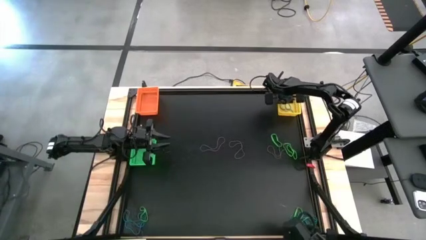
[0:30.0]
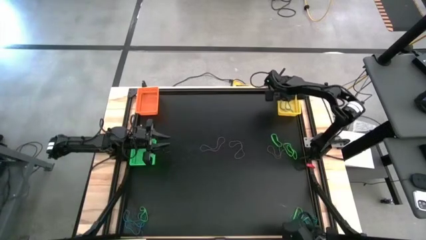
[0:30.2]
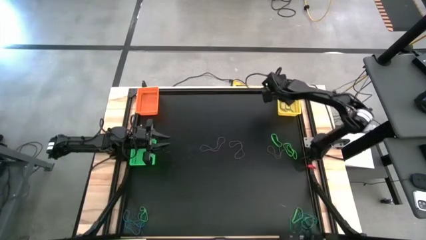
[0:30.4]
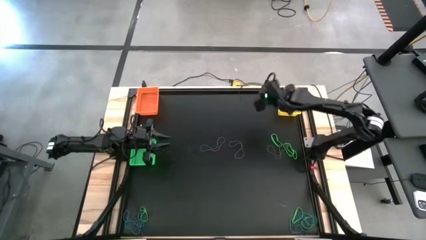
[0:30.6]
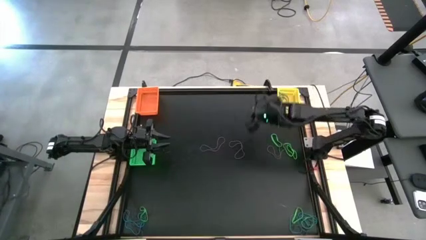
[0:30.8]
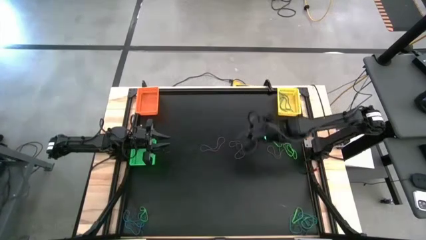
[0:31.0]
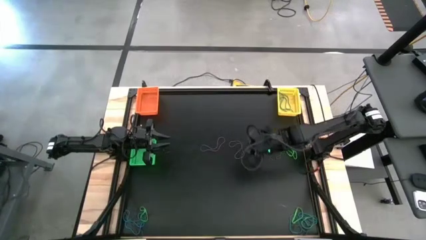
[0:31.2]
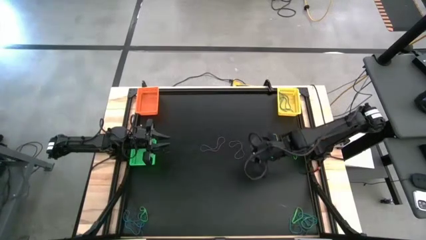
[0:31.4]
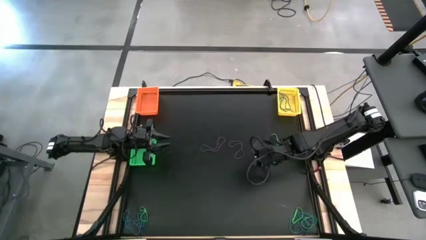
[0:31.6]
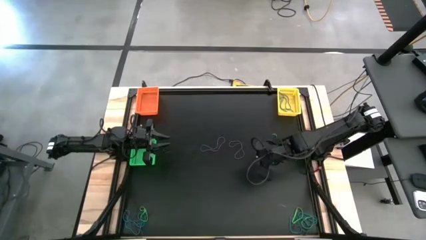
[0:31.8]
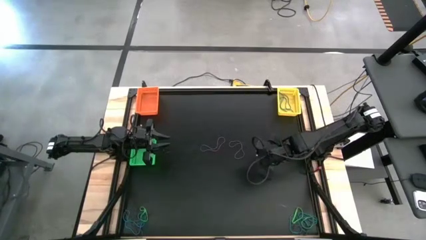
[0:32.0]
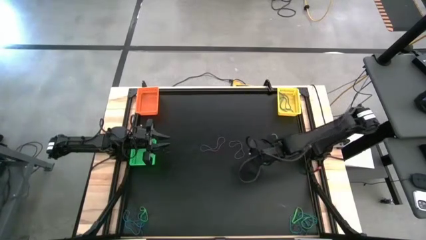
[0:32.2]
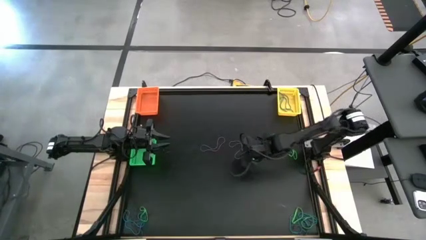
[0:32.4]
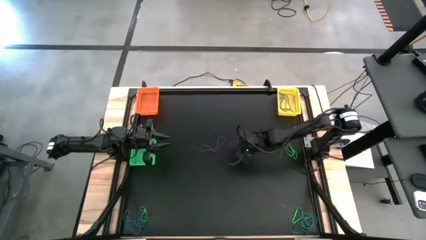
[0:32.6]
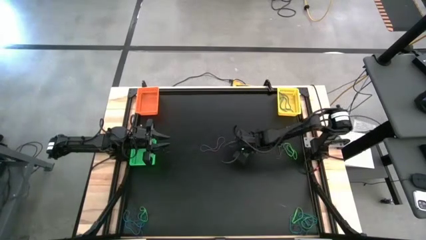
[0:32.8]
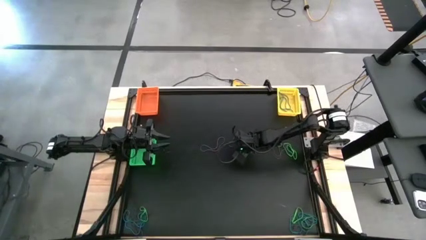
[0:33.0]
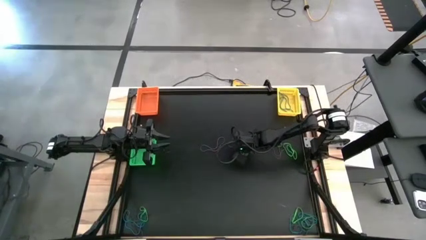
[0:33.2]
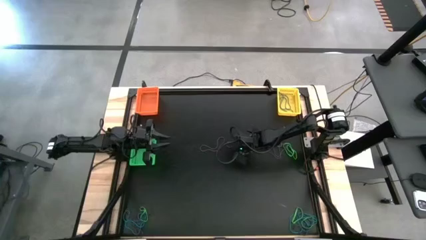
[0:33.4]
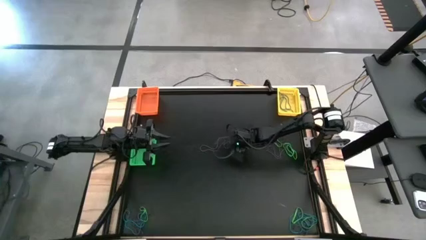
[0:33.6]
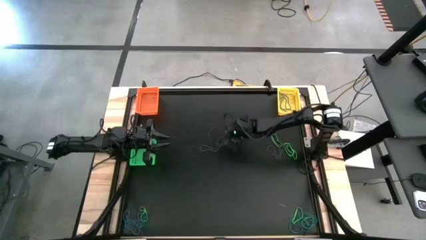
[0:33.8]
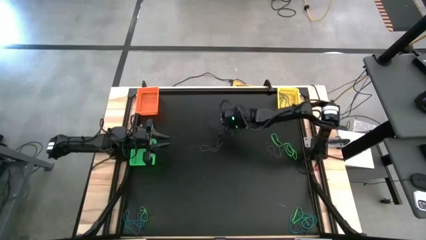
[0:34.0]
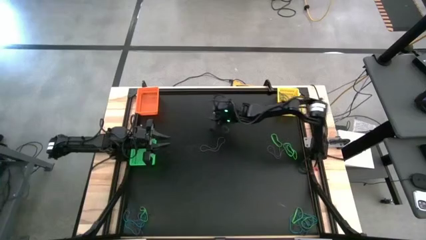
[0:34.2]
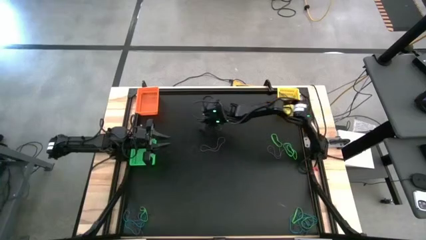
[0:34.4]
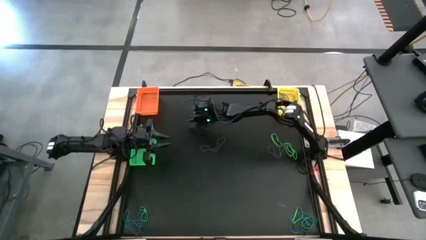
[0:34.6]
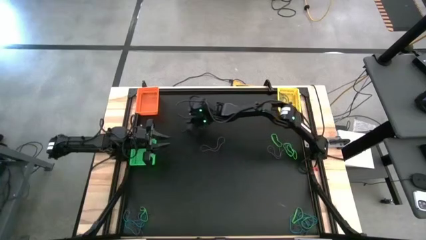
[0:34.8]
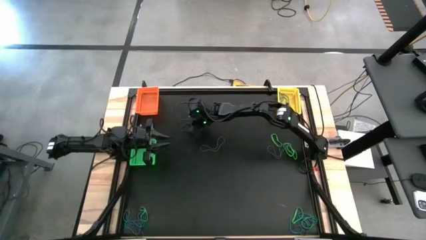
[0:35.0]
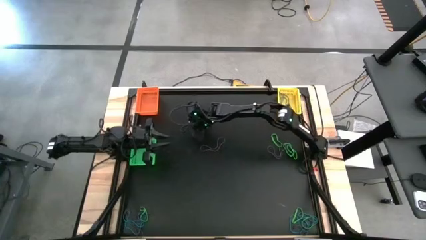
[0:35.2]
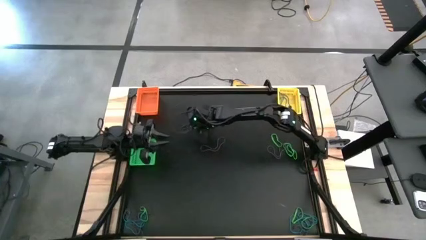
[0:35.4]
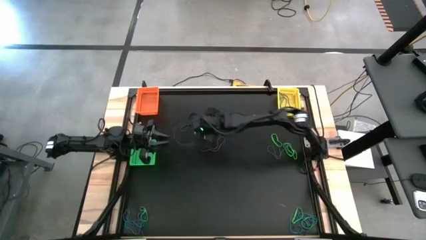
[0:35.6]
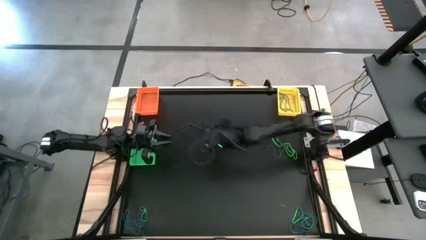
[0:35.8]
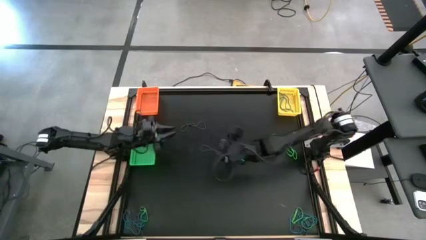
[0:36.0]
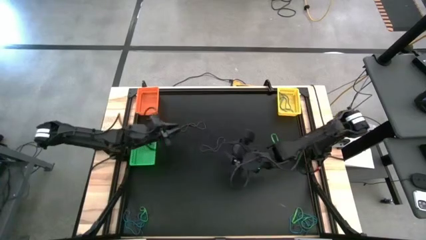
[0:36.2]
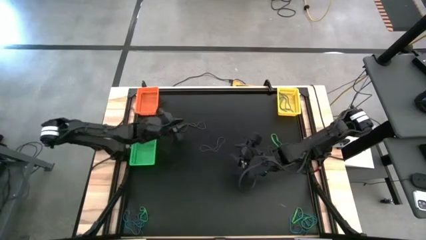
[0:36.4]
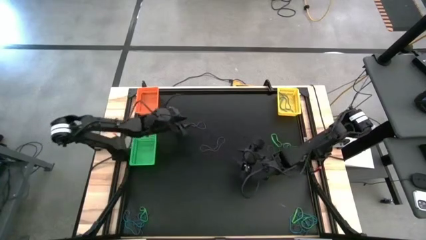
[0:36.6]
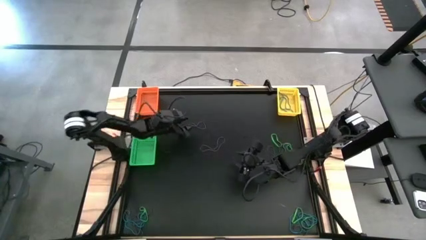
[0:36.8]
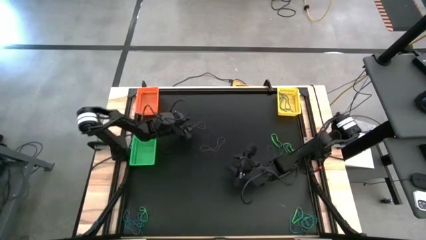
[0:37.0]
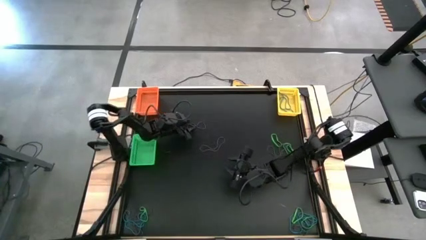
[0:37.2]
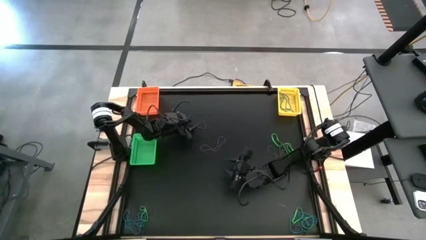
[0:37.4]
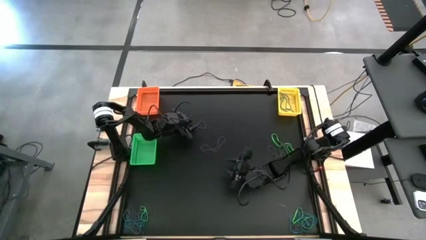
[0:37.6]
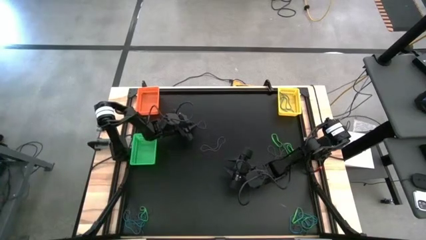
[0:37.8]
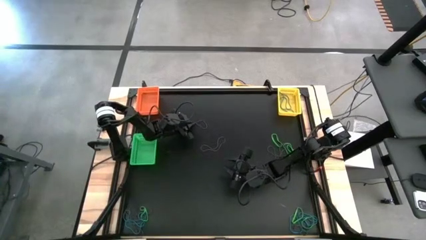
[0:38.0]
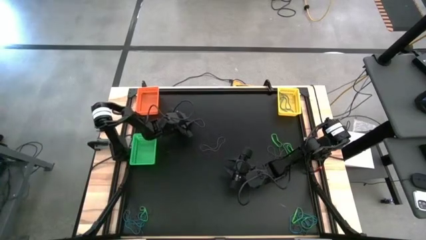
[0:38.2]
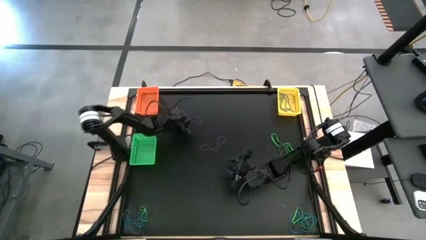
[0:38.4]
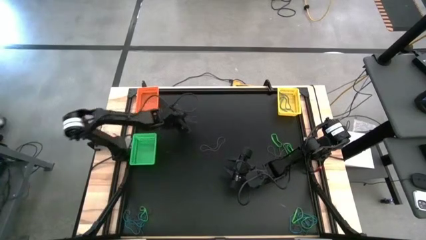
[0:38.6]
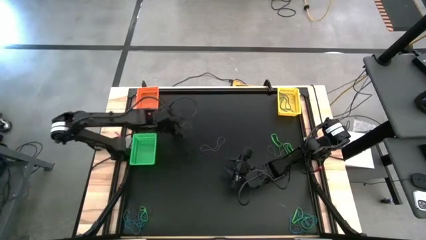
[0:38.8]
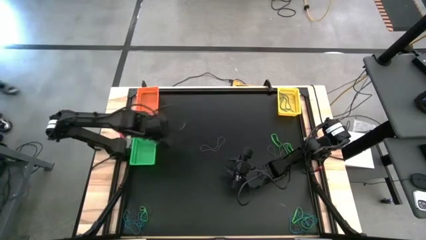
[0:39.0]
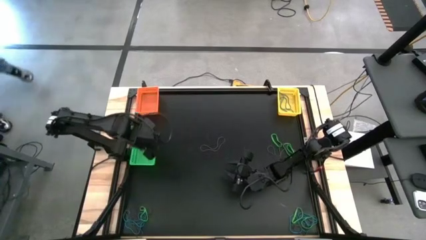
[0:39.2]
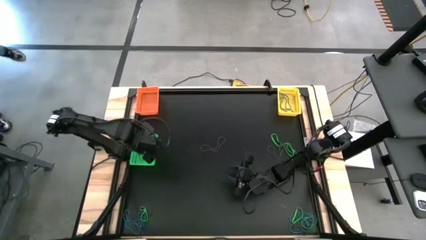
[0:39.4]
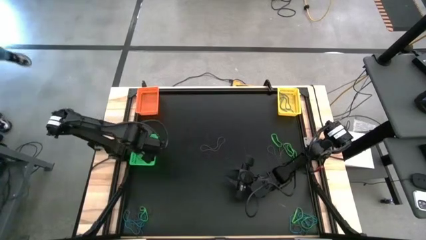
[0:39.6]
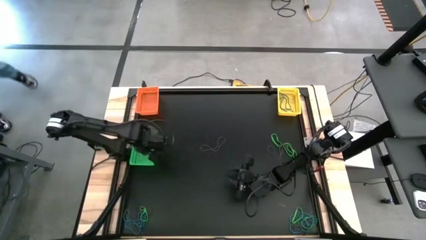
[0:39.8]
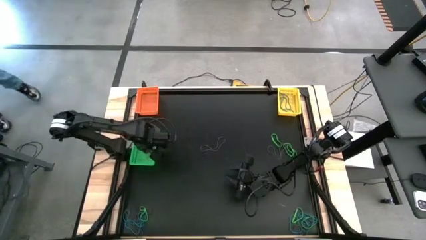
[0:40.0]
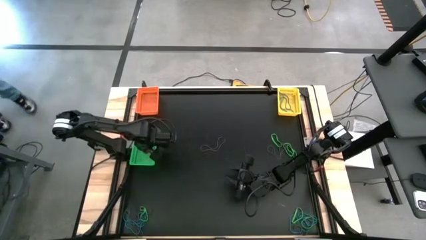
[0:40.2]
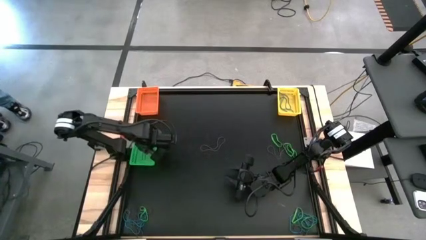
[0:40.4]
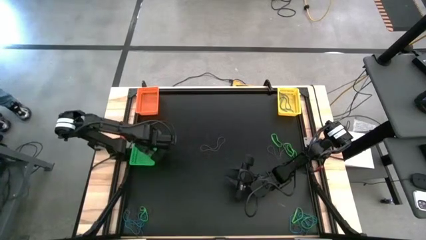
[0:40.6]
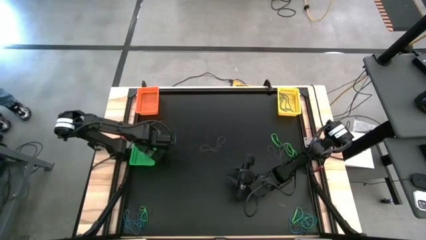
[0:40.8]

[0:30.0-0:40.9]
Task: Sort rubber bands into baskets
Put the center violet rubber band into the green bin

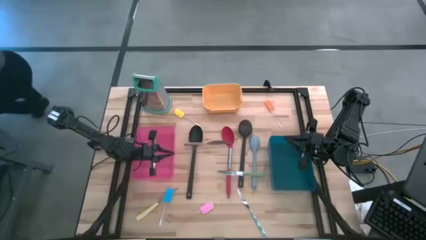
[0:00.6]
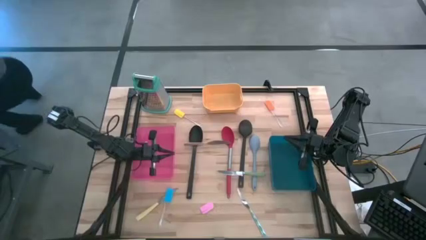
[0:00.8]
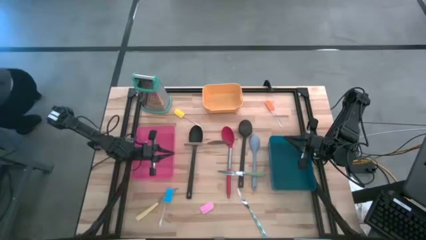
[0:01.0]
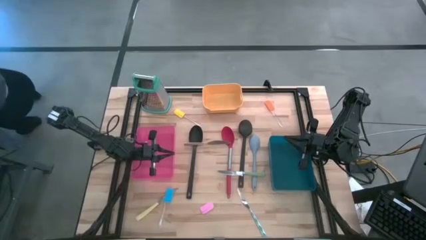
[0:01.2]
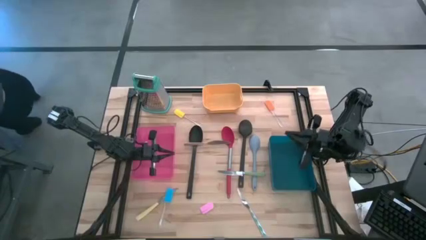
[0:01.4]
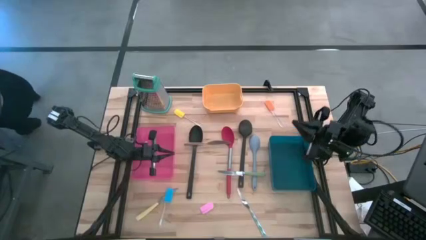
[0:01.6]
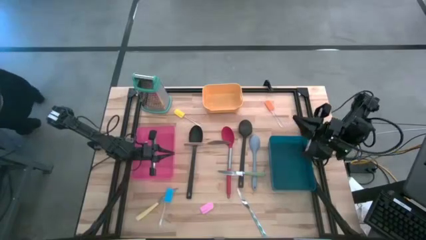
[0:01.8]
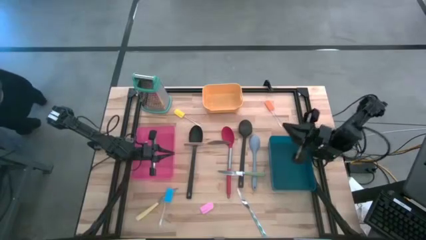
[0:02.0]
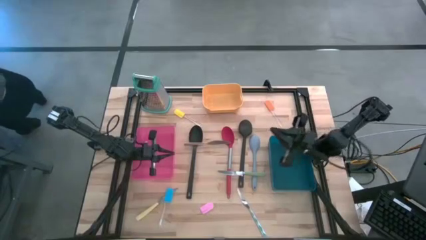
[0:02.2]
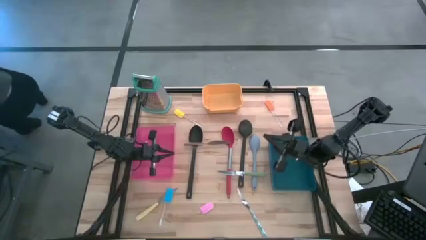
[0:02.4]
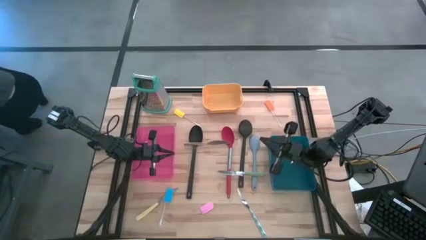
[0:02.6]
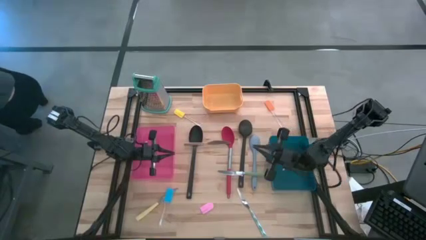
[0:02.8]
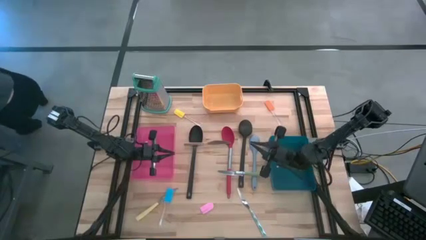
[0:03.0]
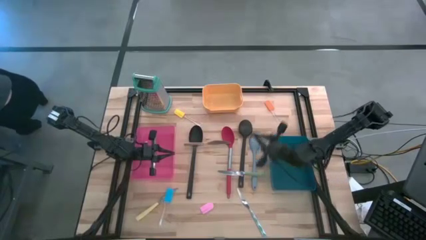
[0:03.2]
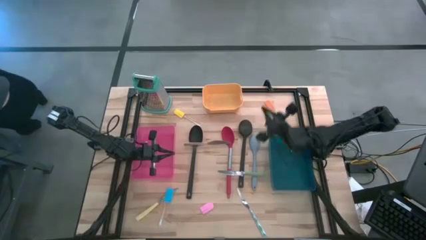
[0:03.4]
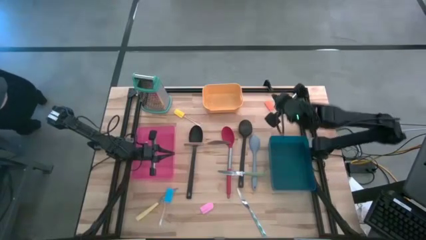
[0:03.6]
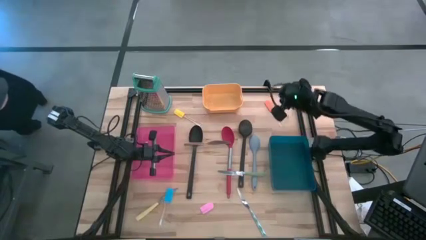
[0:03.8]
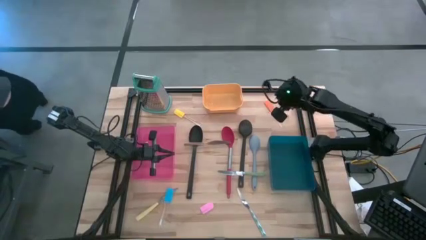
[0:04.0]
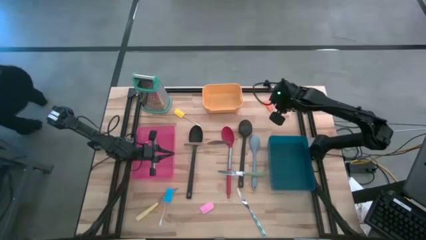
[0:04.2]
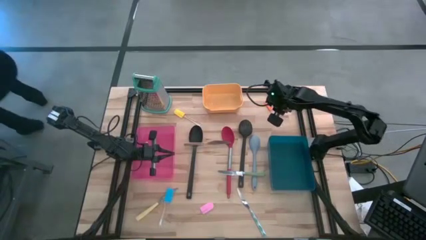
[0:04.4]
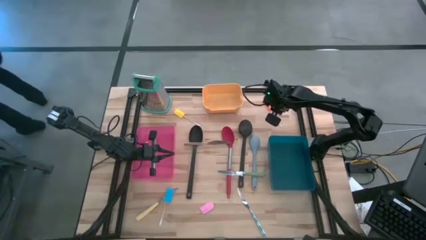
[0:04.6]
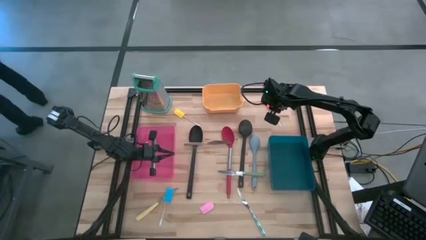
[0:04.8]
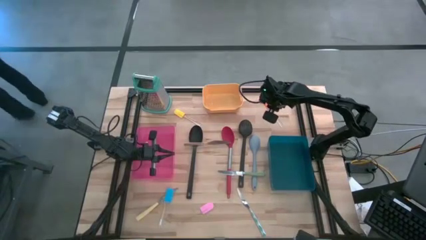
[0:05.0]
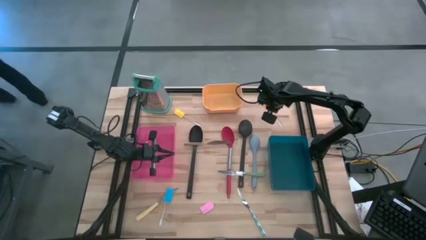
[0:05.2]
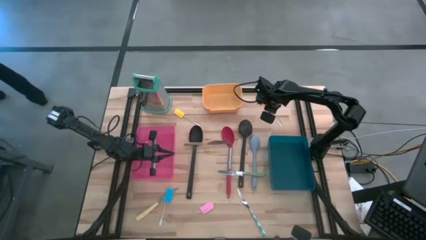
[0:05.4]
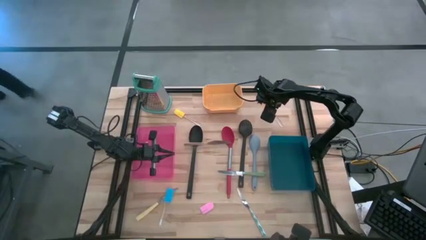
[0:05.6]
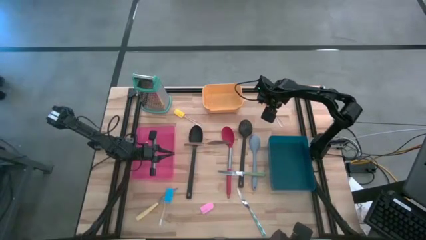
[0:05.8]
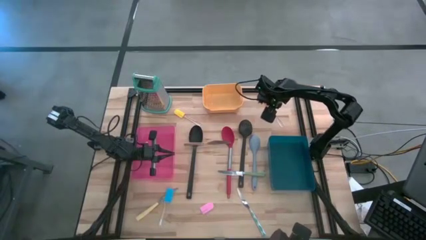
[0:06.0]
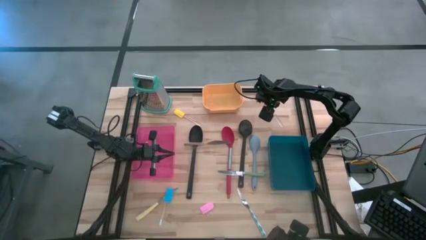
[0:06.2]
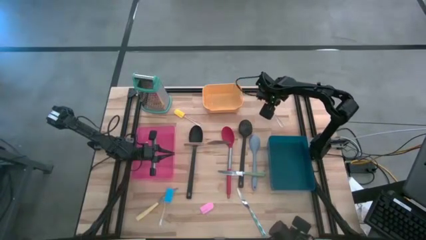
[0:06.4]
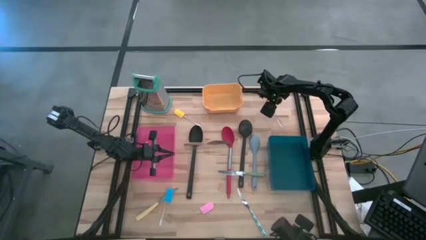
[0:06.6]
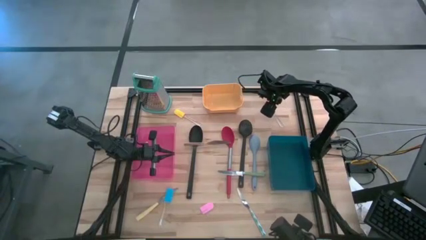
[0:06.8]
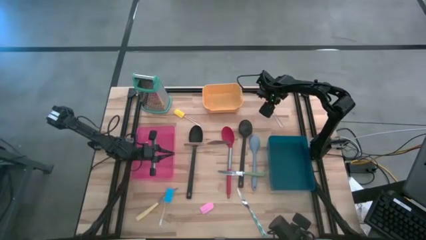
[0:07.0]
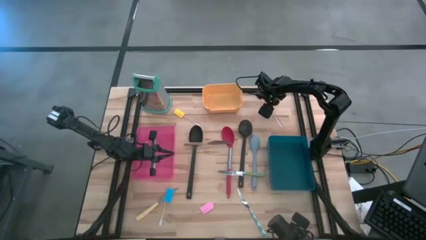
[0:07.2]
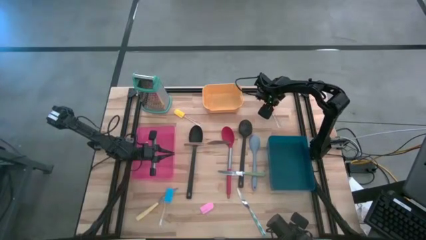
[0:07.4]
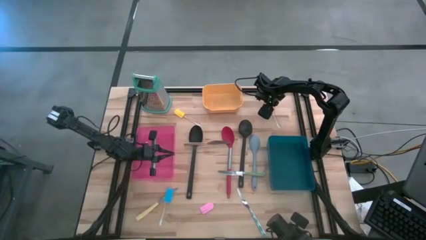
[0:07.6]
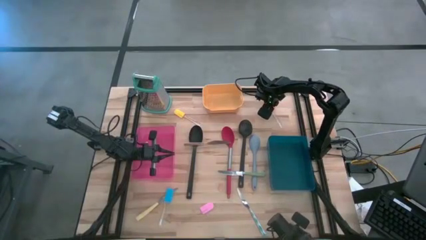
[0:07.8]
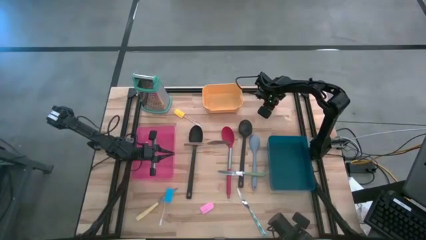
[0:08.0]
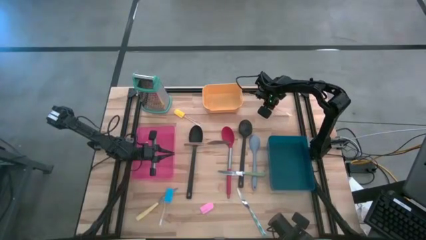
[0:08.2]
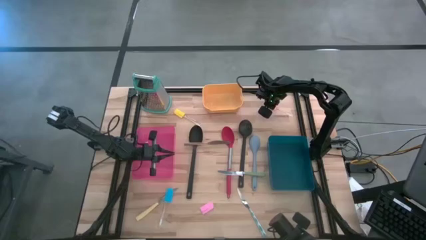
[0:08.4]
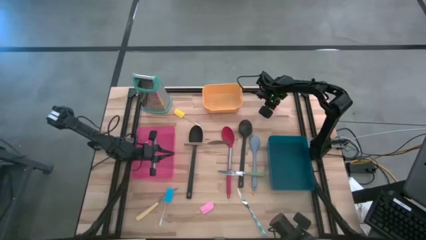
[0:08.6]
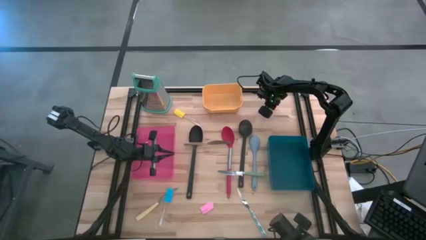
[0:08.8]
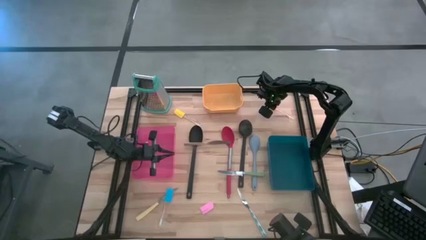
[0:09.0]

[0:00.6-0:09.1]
Task: Pick & Place Kitchen Items
Put the orange spatula into the yellow bin
